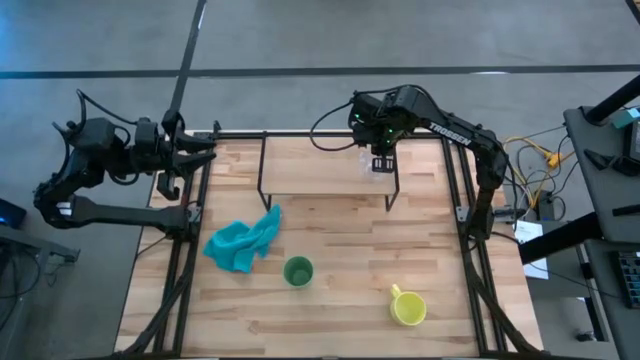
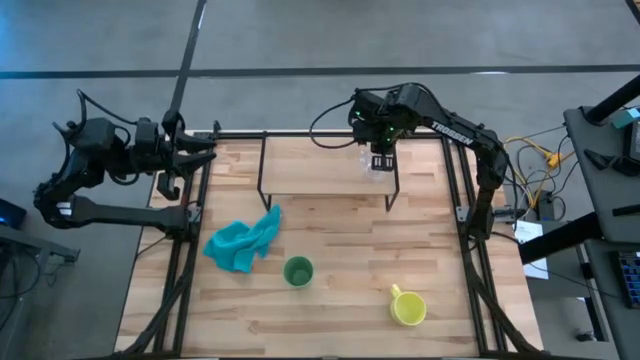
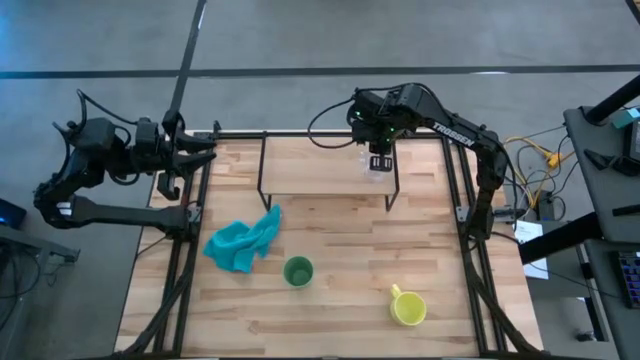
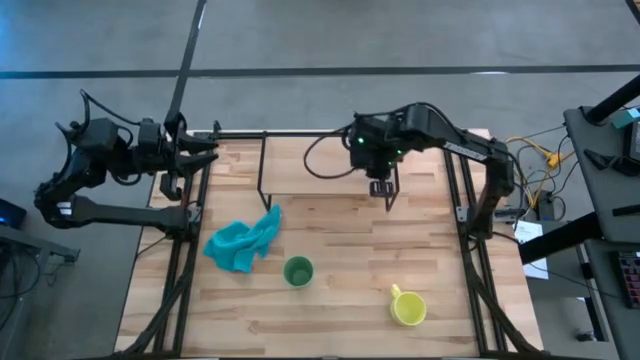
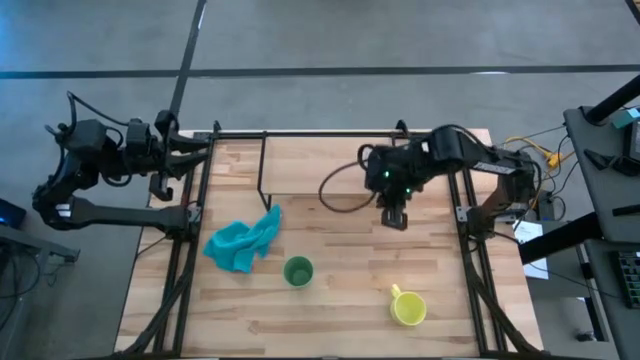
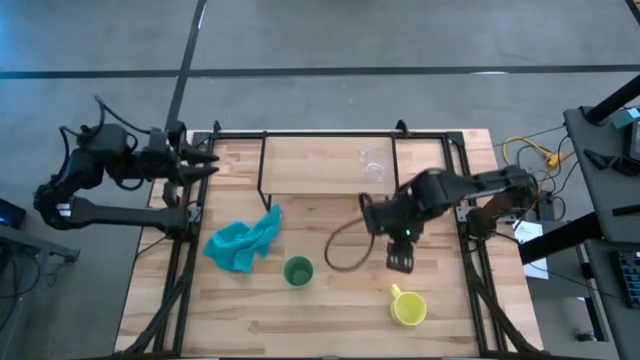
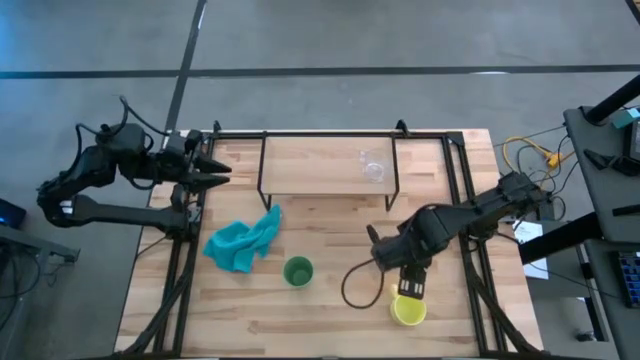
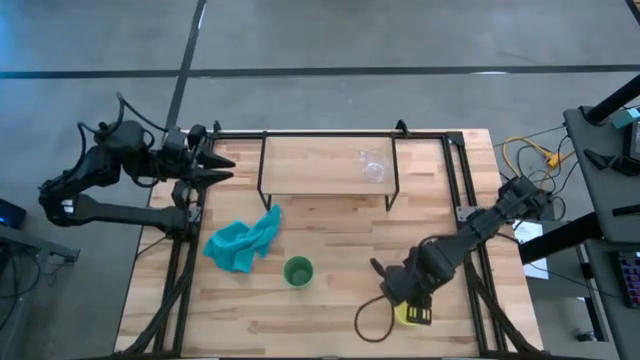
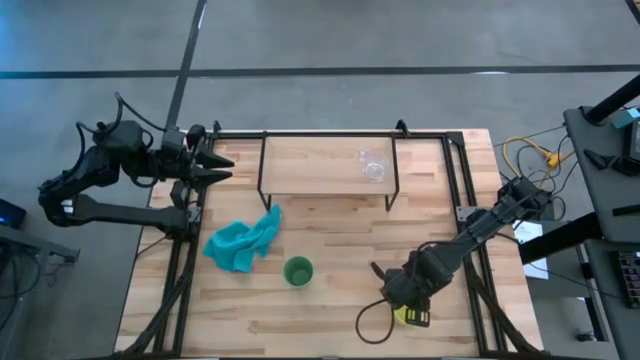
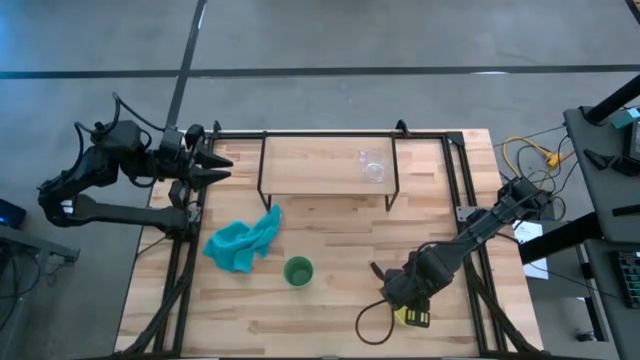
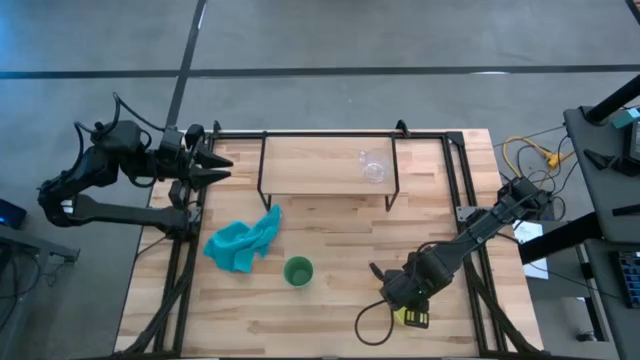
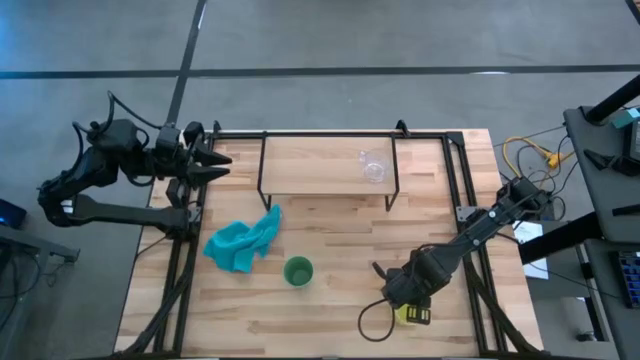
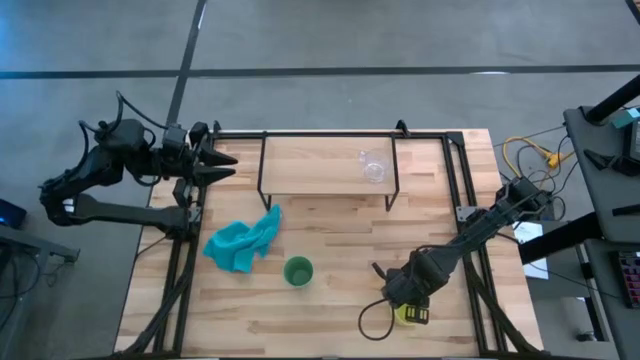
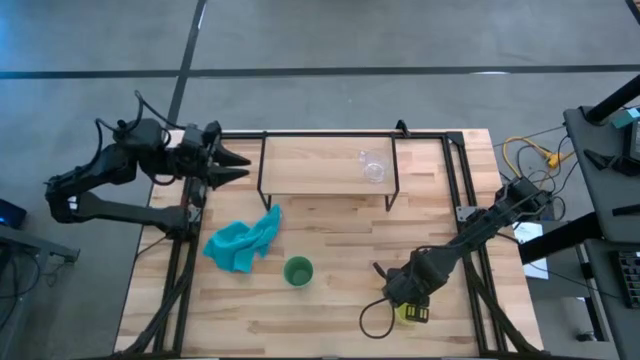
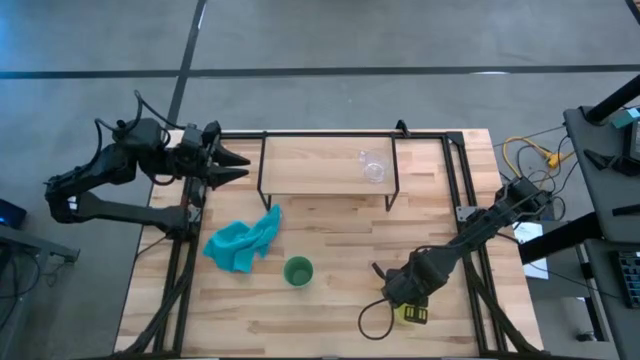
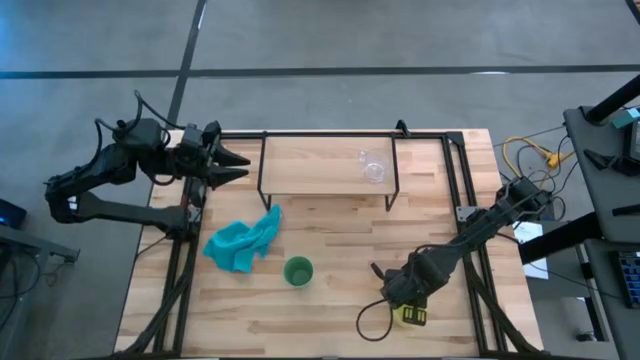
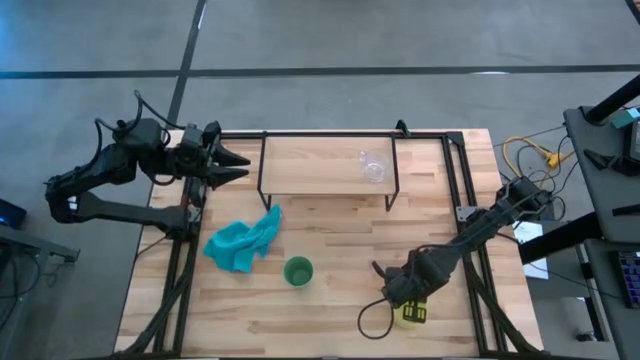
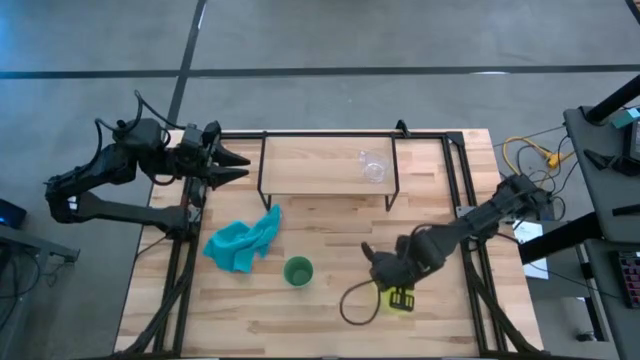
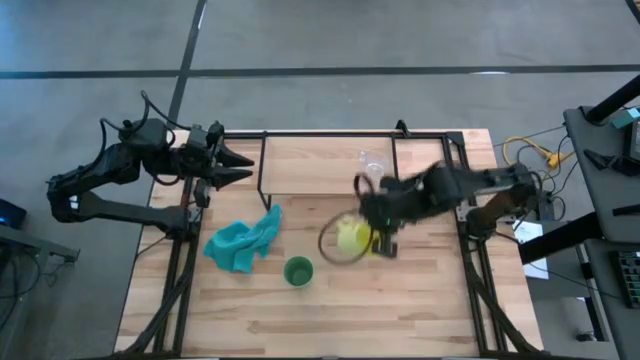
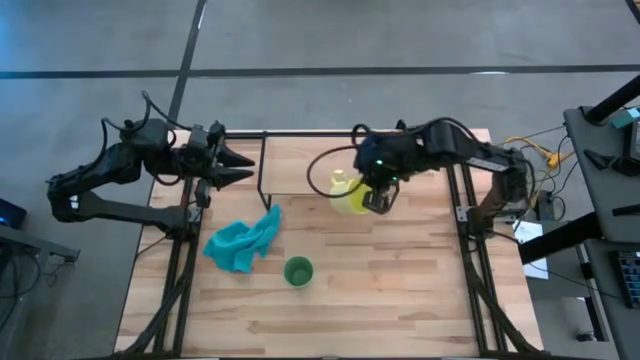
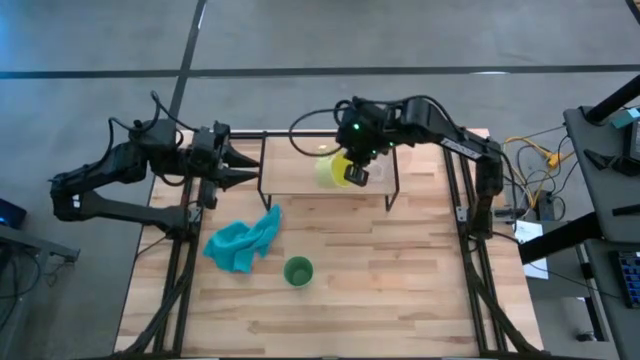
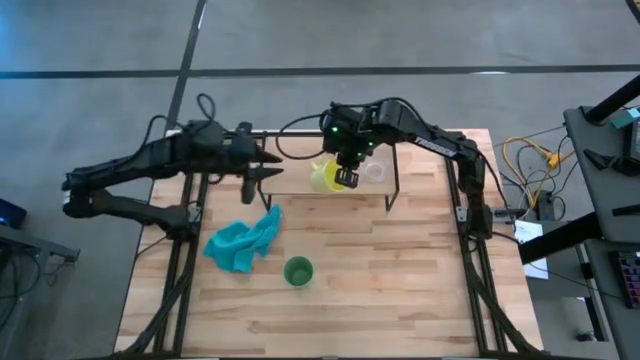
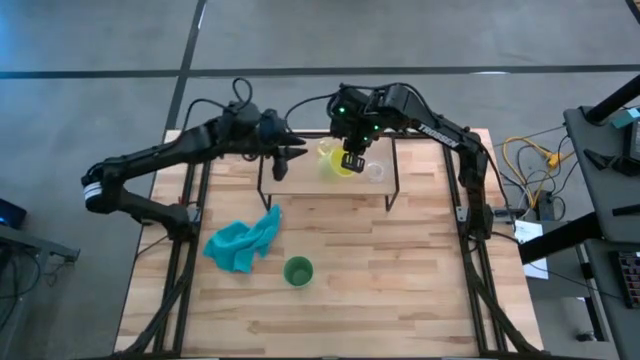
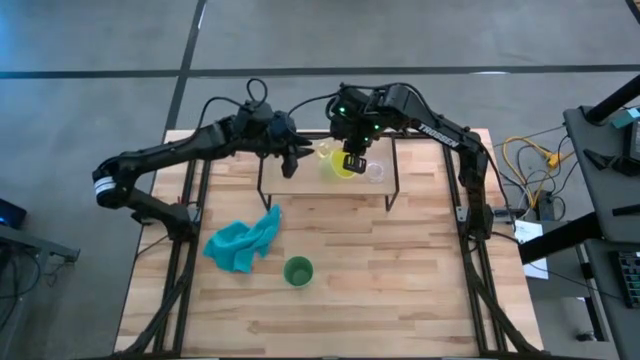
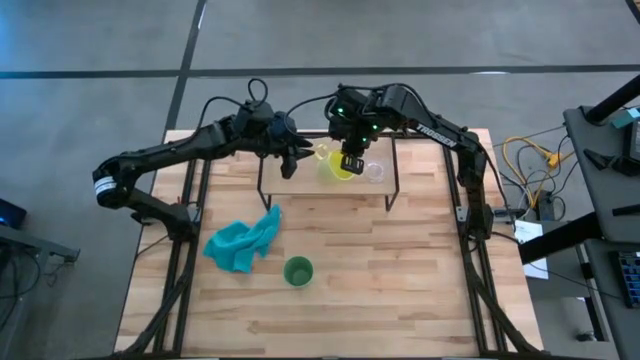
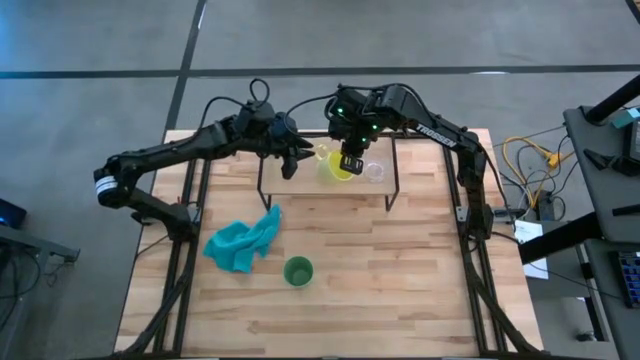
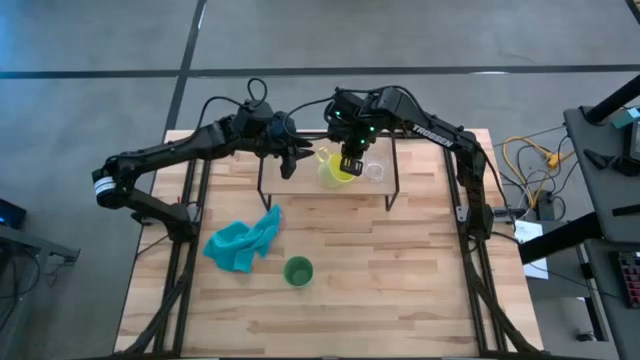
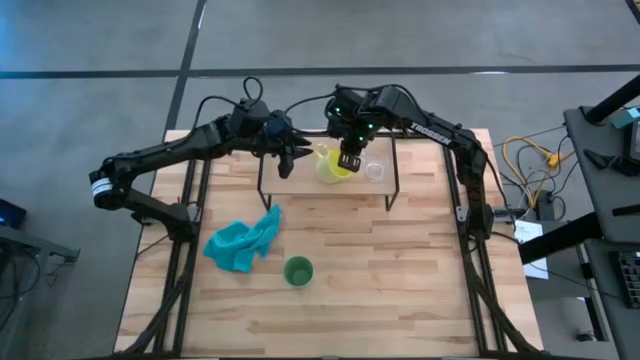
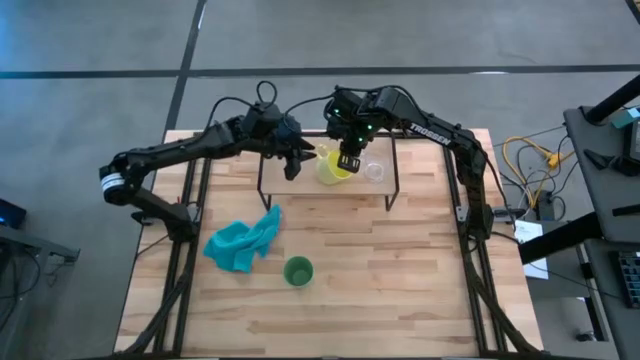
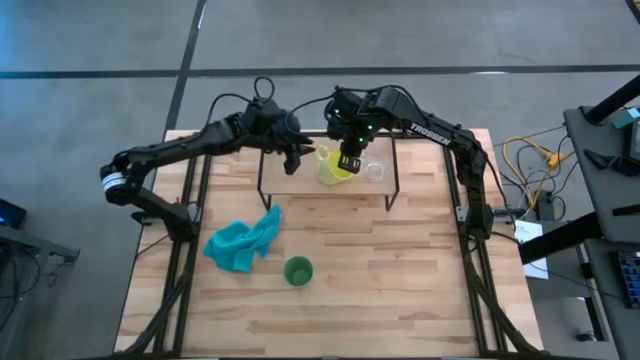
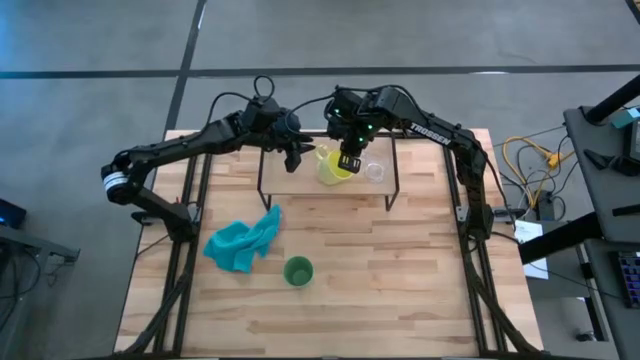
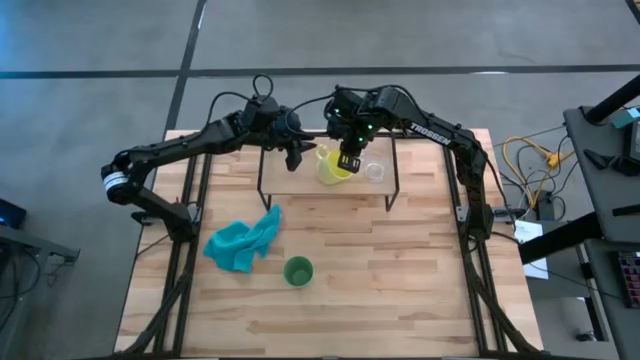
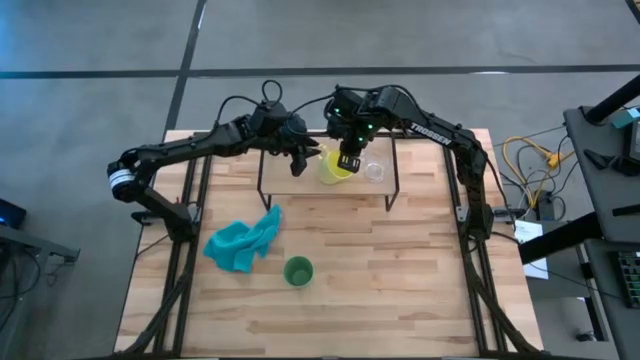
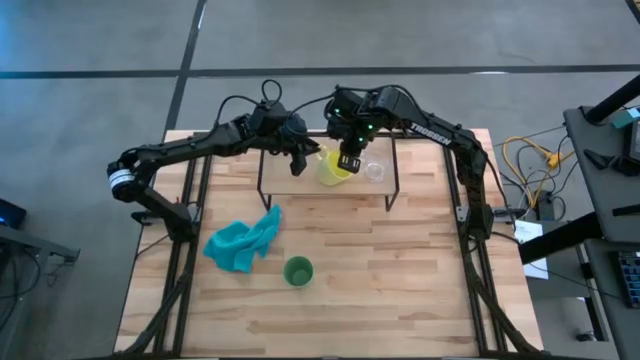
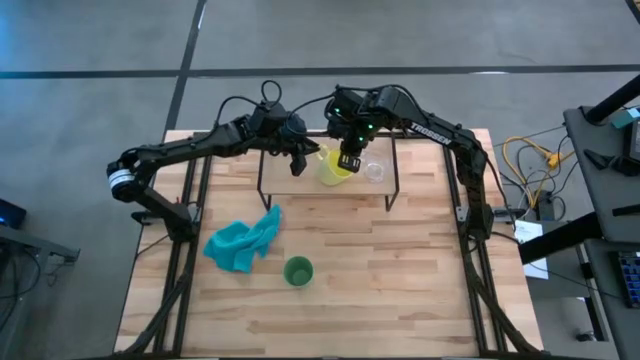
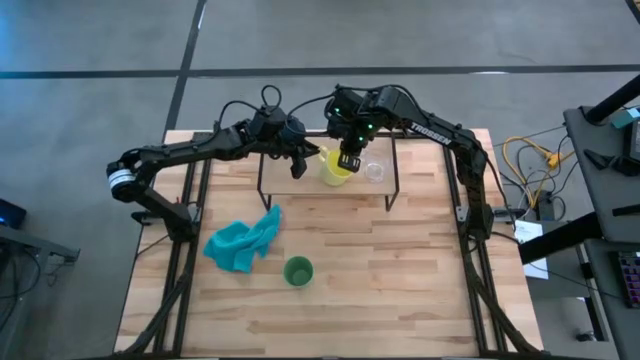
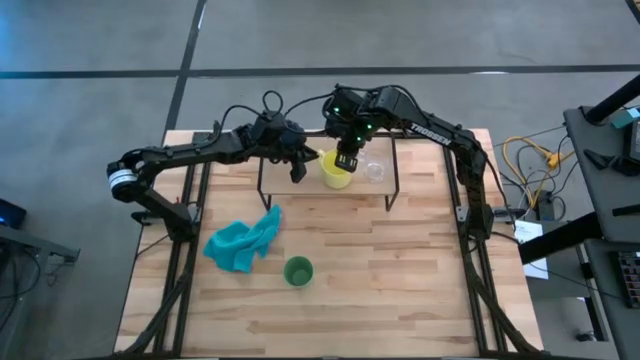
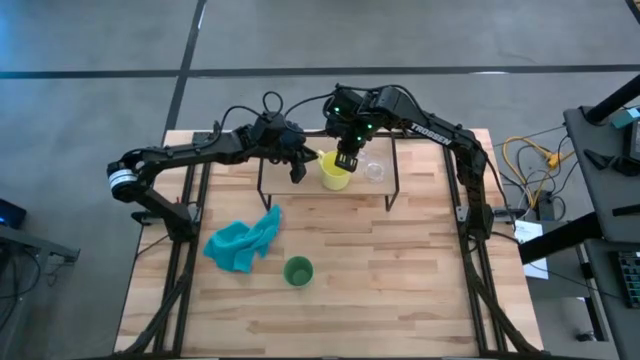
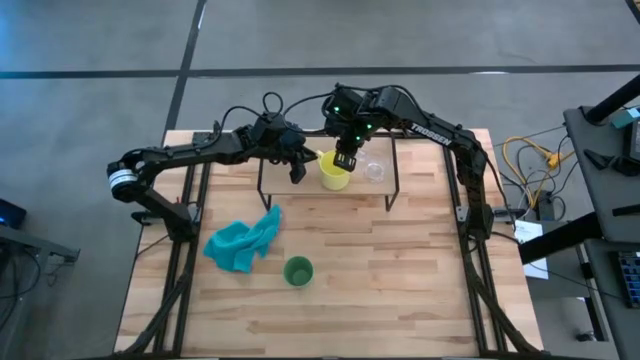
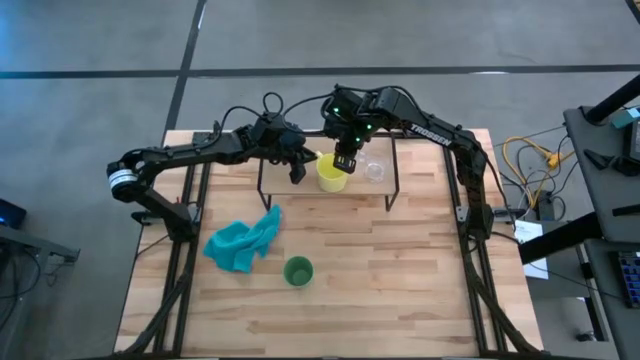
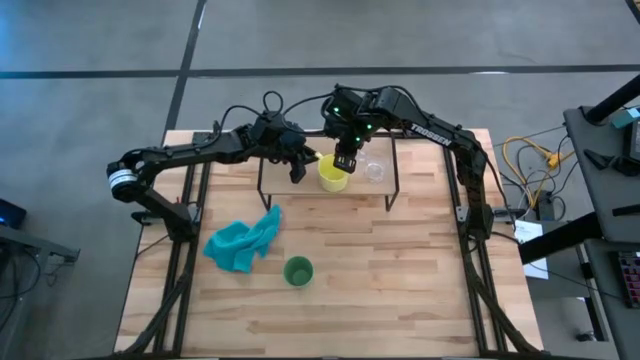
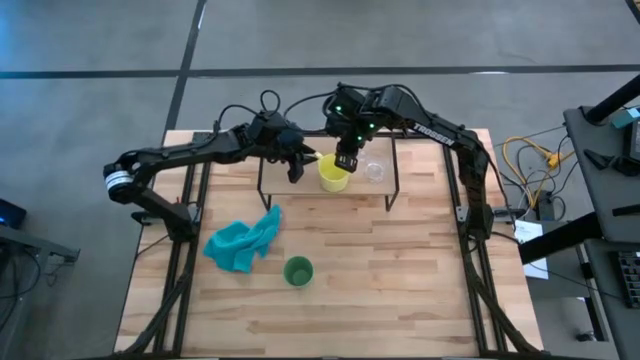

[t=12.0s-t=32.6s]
Task: Stack small to large cups/mugs on shelf
Put the yellow mug on the shelf
